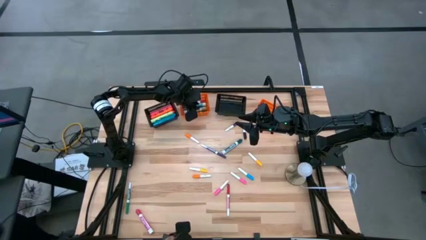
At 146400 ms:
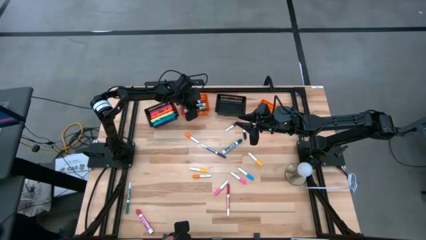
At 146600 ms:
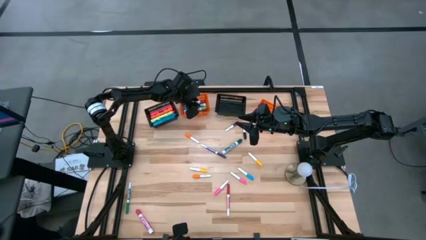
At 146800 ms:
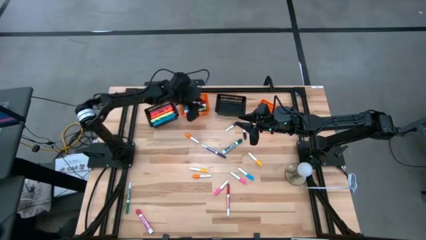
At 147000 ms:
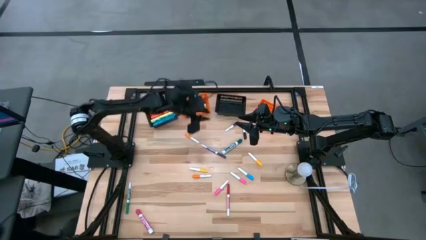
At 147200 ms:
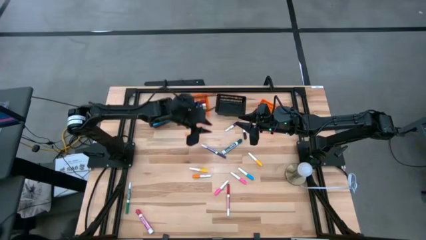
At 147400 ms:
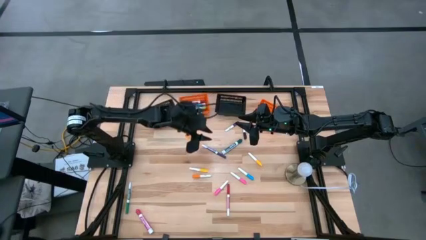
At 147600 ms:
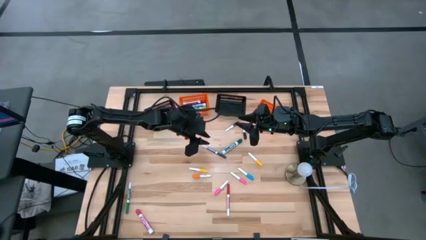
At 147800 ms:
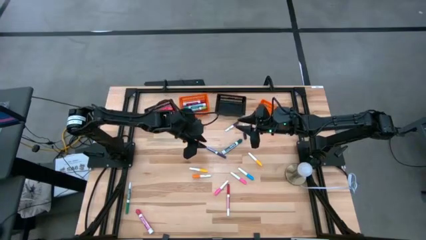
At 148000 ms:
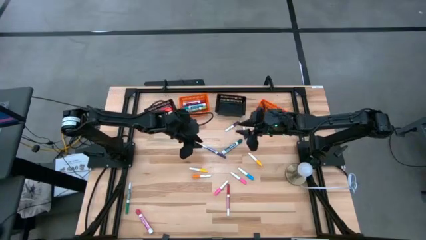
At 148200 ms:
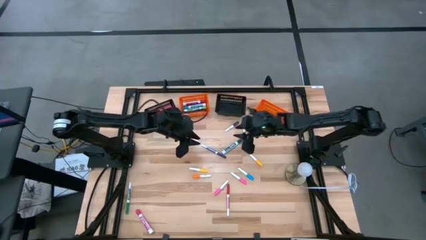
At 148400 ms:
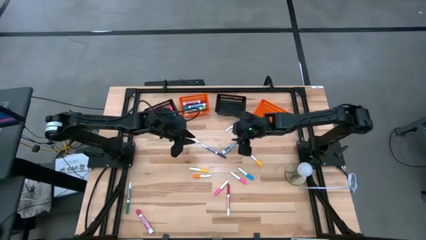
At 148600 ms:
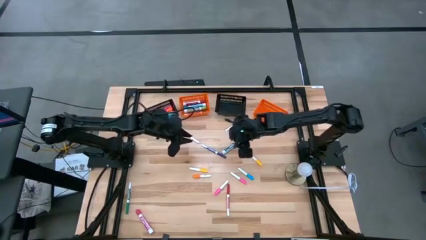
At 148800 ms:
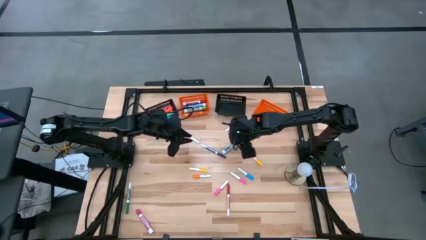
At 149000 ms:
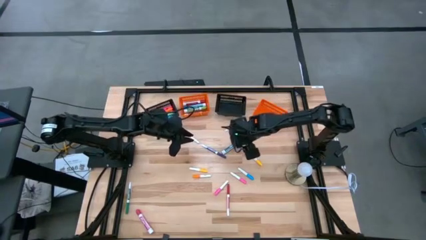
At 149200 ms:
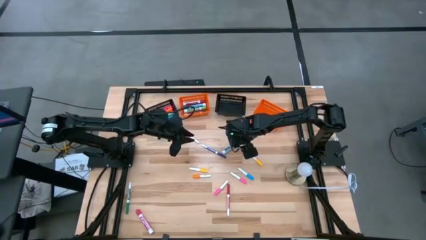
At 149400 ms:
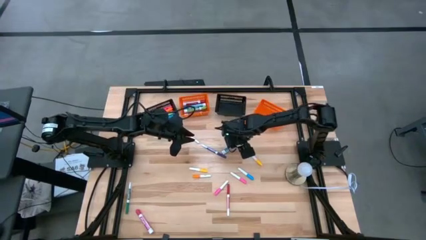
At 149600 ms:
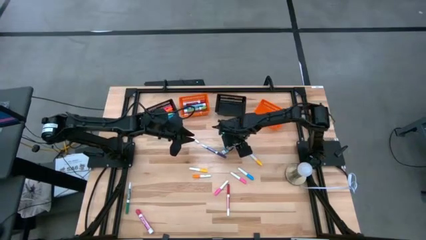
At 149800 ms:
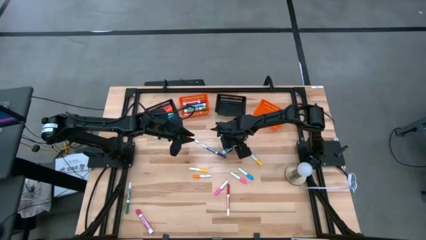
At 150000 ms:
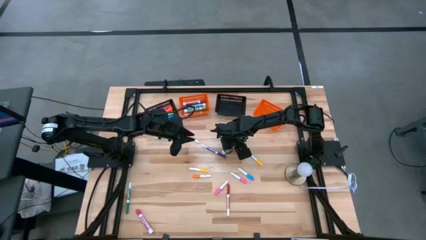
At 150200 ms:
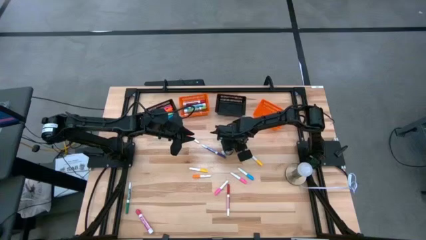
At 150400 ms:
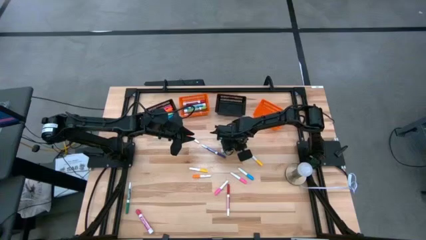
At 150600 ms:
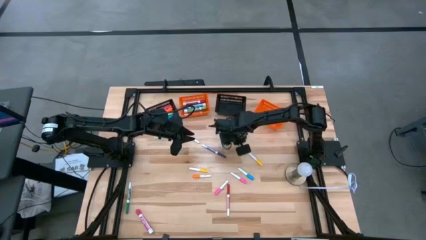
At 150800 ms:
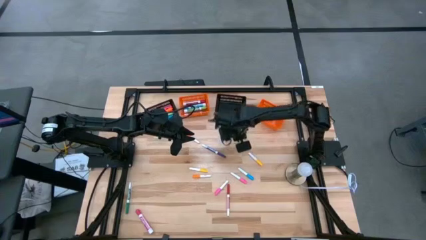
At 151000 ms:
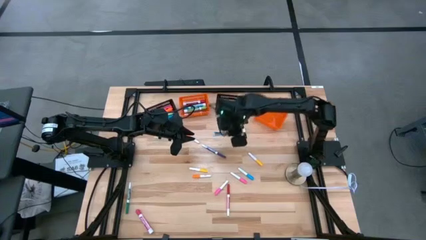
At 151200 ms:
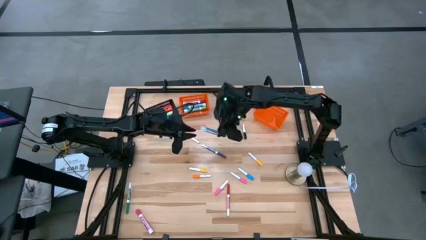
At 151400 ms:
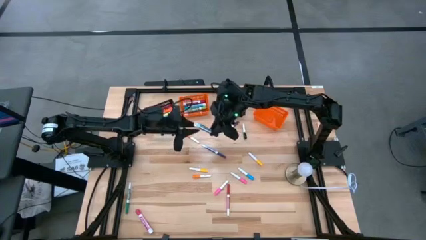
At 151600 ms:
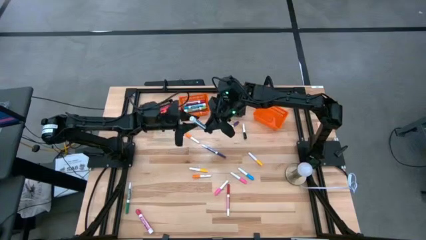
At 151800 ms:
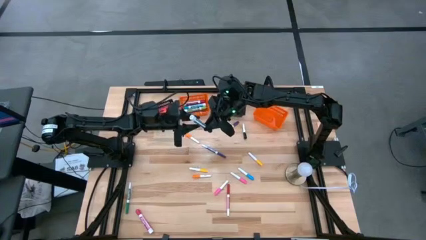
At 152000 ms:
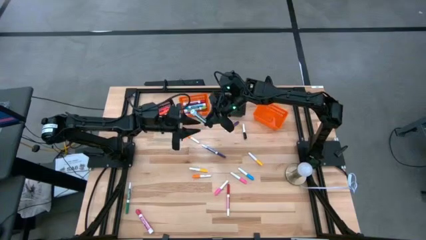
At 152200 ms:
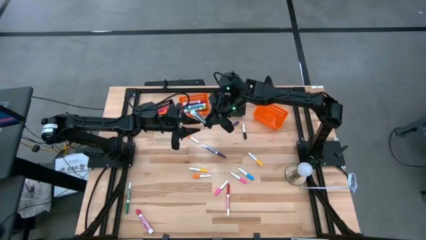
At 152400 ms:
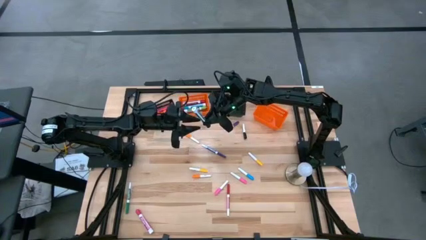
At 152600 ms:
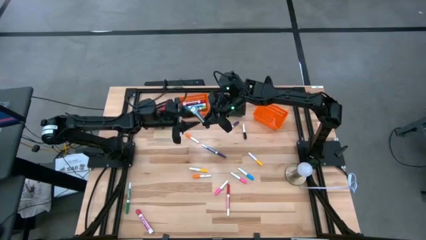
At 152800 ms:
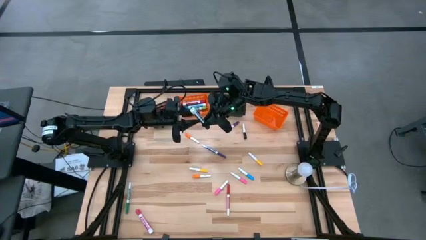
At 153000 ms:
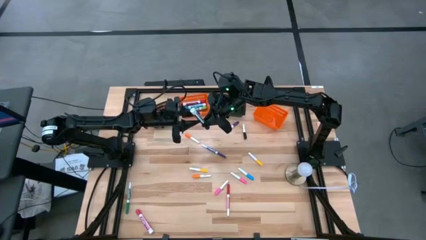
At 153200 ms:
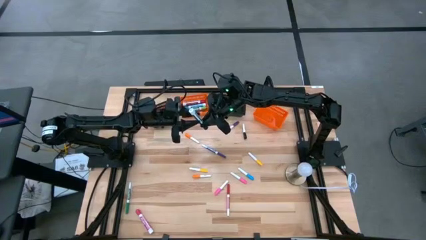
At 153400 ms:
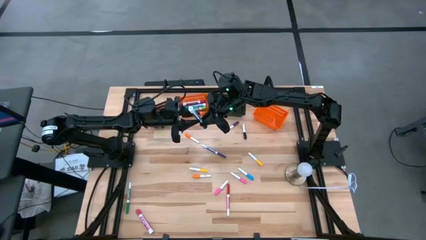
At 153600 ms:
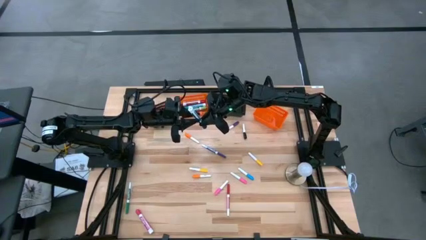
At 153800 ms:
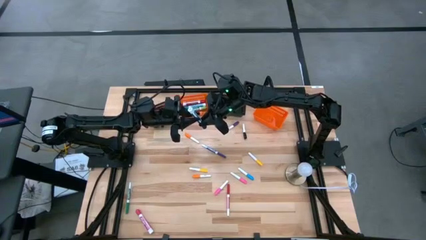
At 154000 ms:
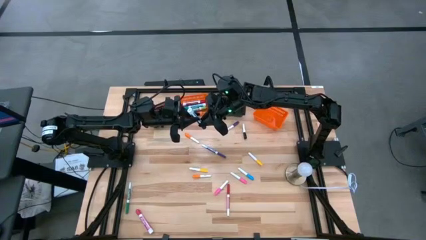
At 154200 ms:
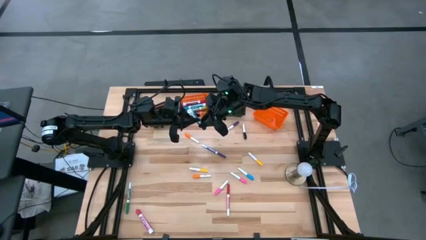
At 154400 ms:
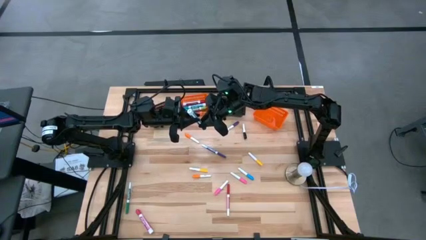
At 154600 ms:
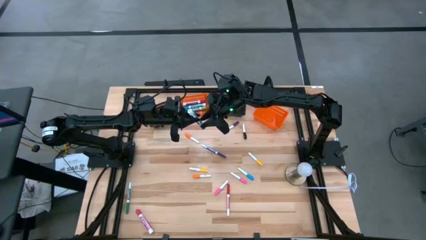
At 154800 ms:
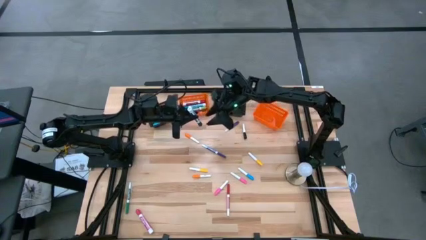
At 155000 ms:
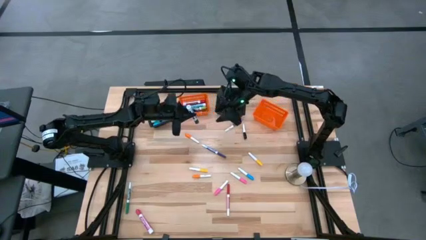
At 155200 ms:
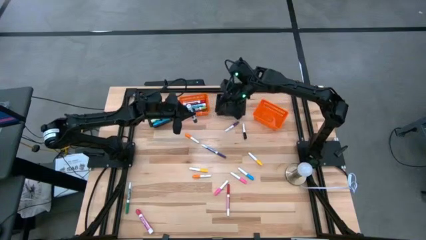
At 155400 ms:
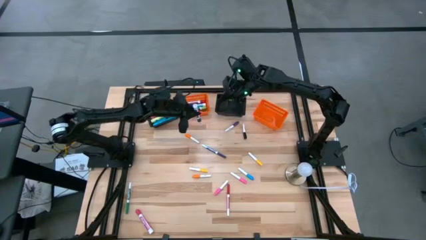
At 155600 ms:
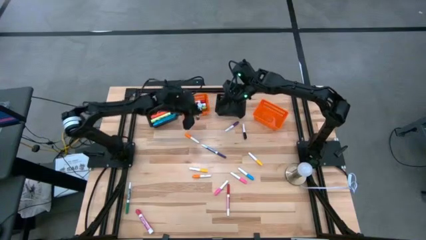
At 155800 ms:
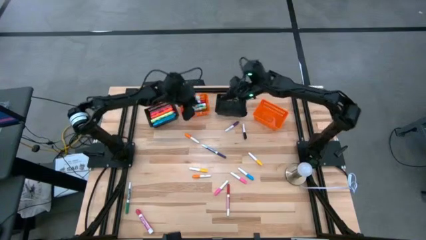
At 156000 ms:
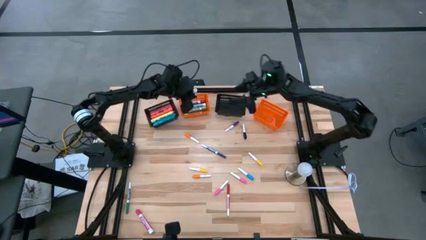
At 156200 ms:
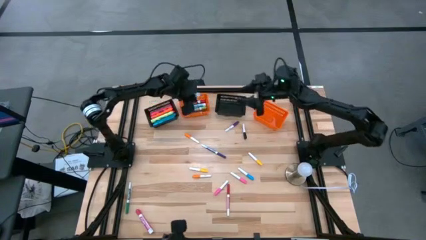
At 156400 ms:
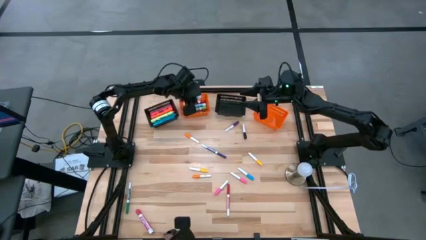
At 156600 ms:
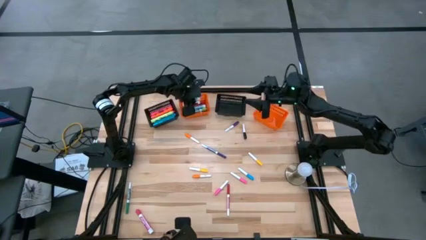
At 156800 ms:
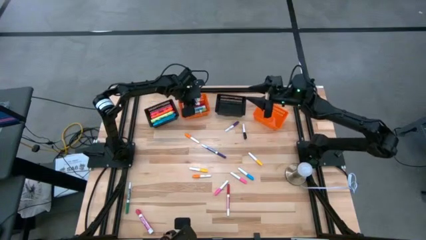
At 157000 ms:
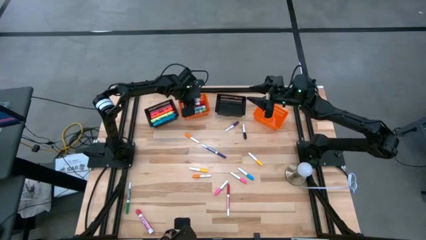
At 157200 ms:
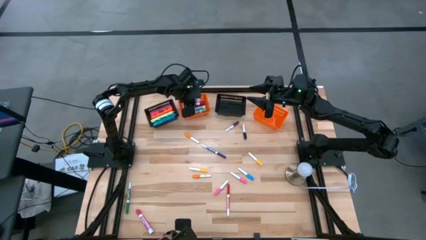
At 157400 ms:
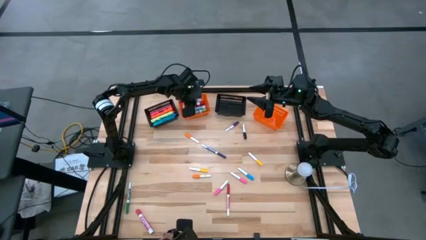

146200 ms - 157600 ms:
Task: Pick & Place Markers
Put the green marker pen into the left orange bin

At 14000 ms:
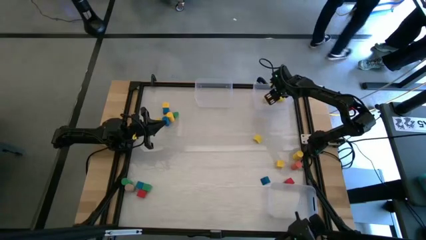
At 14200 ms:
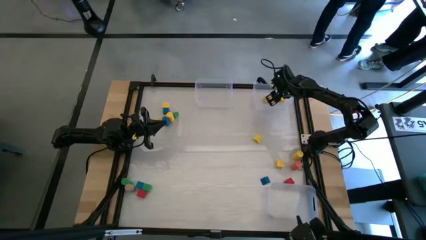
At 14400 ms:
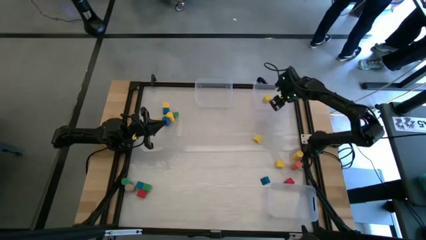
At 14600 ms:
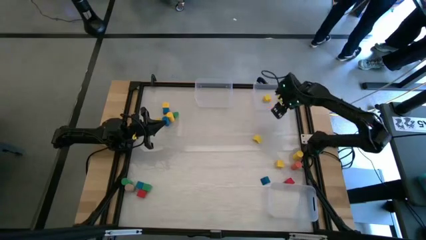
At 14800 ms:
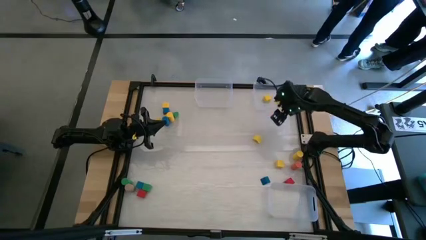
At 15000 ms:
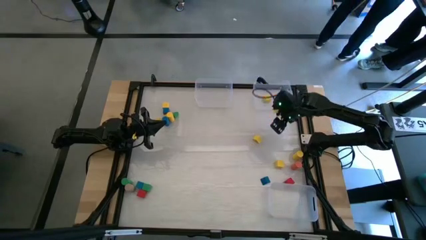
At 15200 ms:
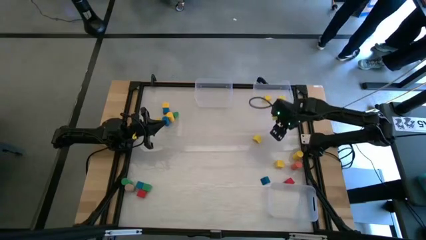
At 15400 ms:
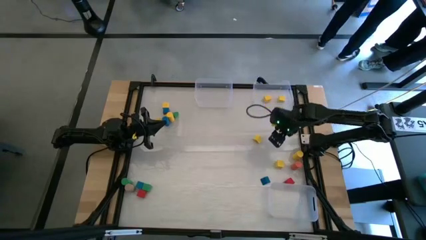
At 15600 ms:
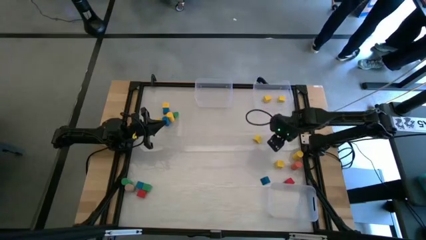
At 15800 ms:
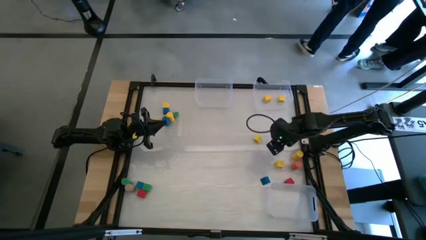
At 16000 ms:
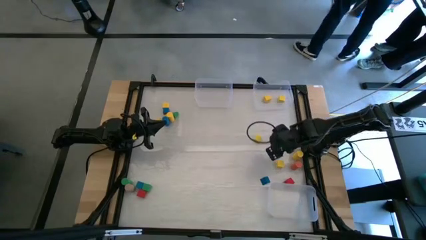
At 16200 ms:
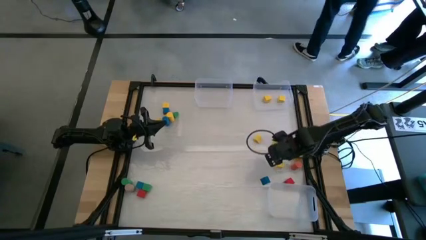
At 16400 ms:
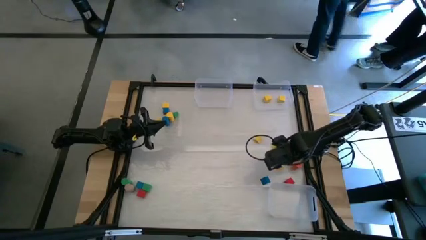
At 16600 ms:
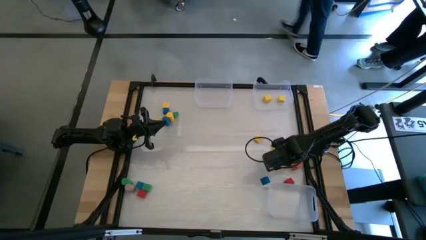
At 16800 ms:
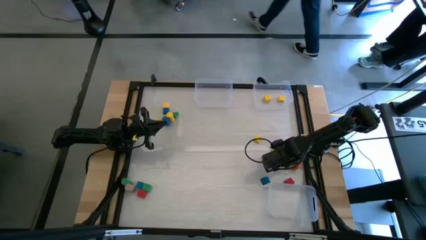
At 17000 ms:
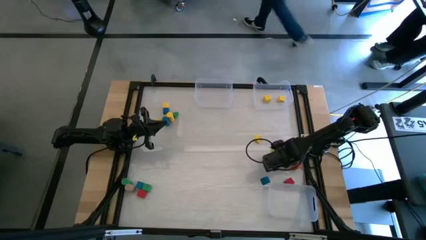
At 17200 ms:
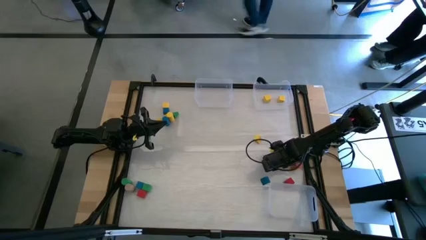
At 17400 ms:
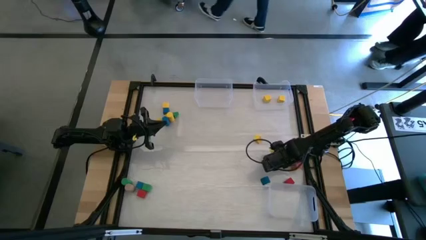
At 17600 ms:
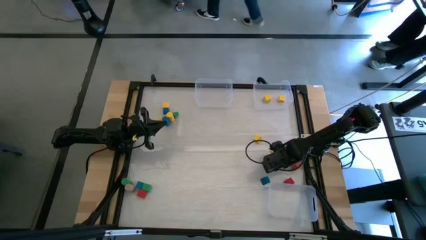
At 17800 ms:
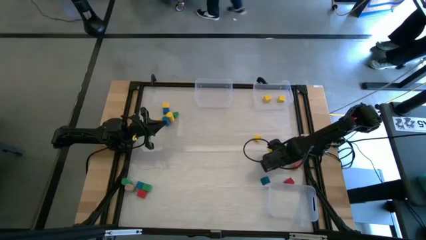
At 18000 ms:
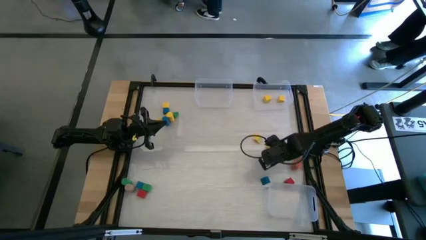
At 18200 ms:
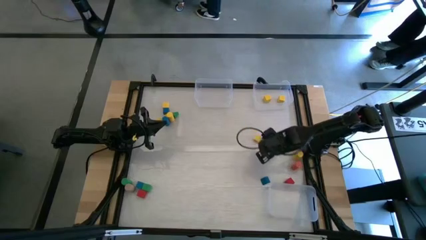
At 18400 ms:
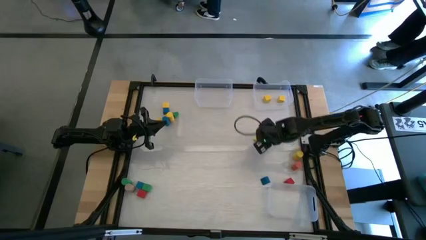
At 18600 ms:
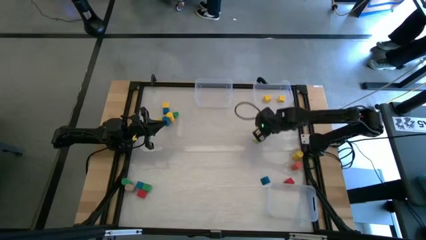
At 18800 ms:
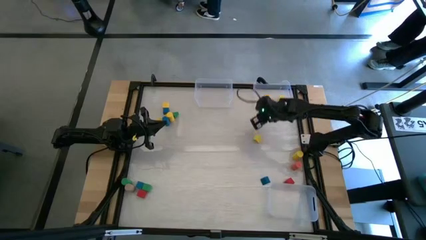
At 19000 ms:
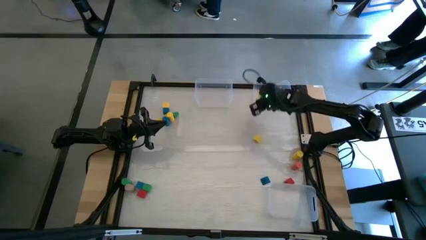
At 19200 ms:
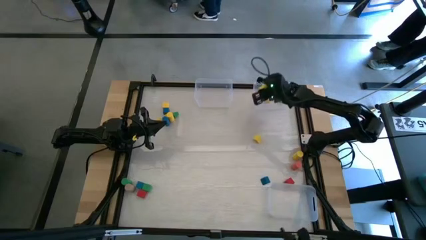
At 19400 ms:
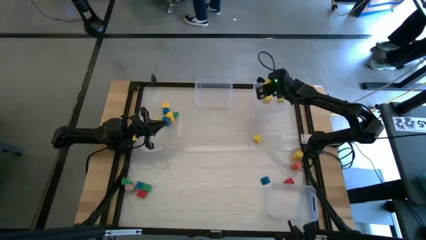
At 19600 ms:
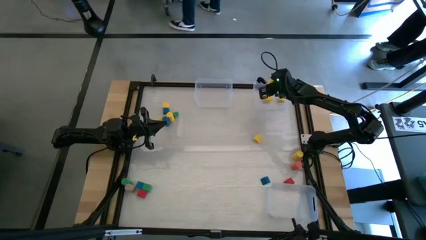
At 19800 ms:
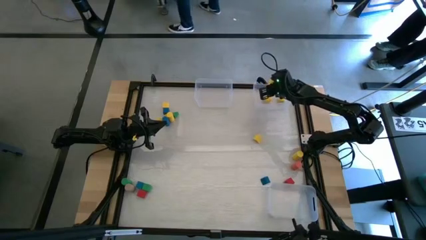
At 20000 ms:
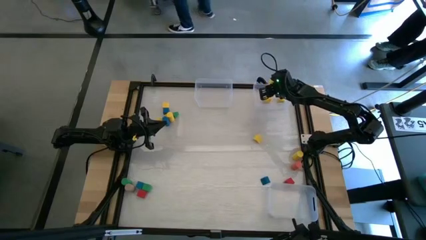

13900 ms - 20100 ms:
Task: Sort blocks by size
Put the yellow square block into the top right transparent bin
